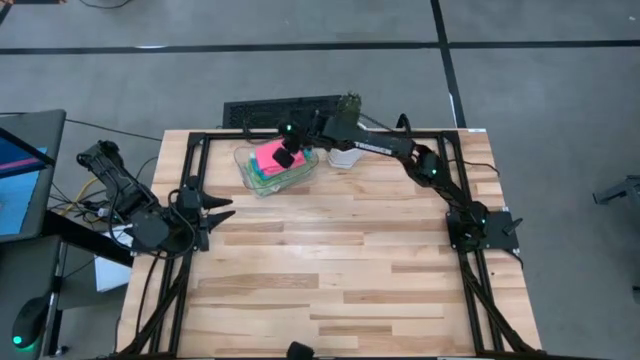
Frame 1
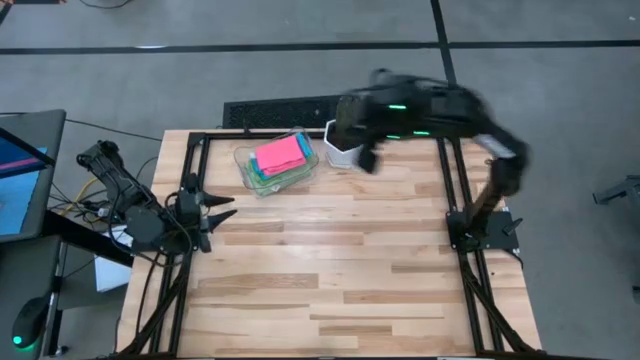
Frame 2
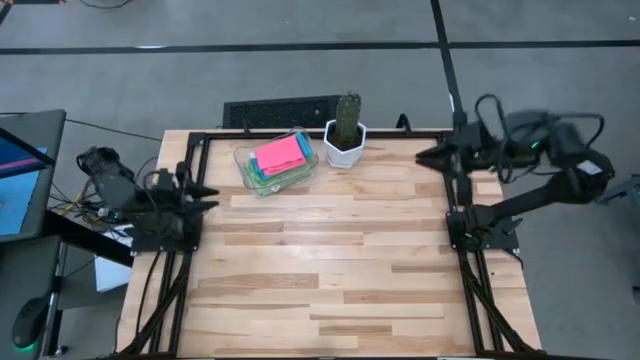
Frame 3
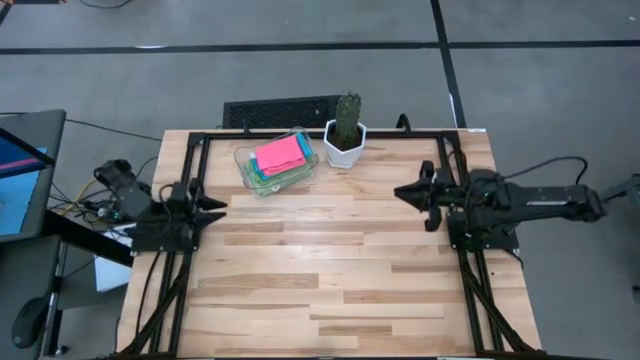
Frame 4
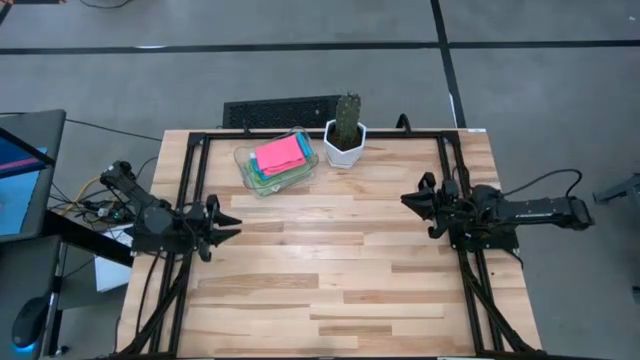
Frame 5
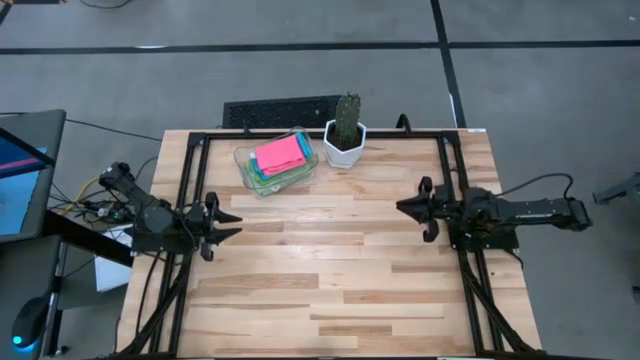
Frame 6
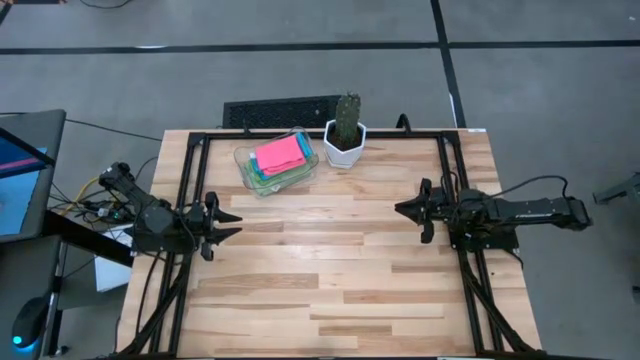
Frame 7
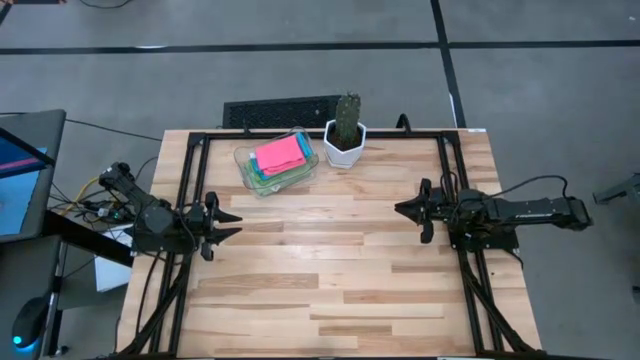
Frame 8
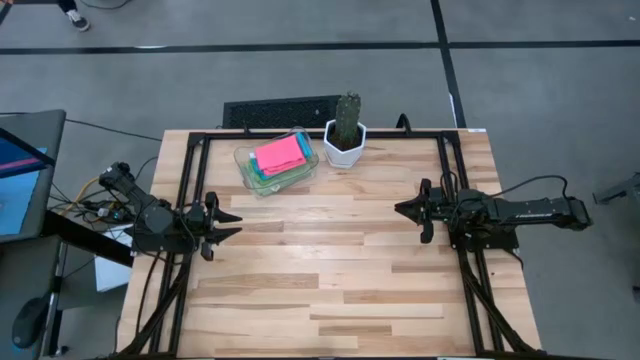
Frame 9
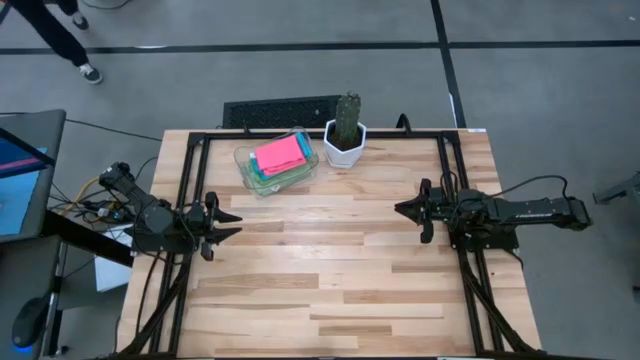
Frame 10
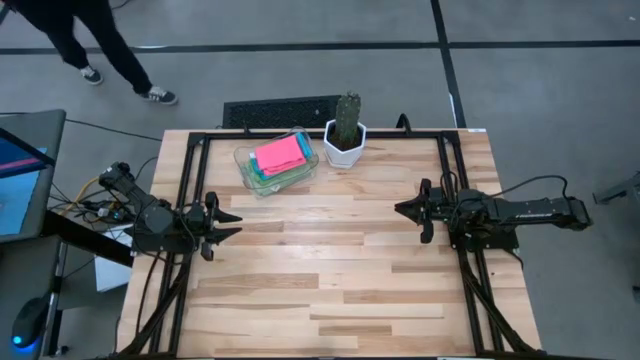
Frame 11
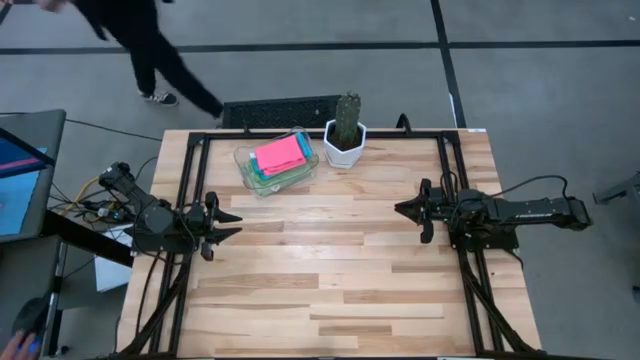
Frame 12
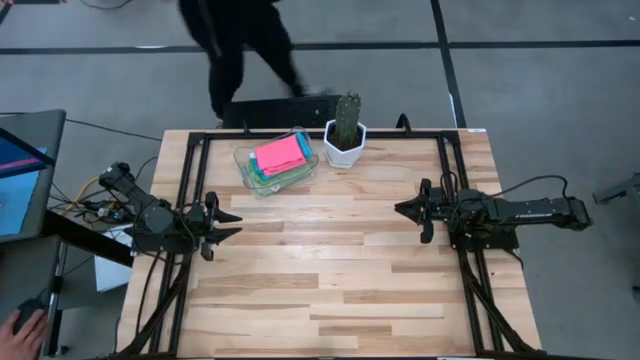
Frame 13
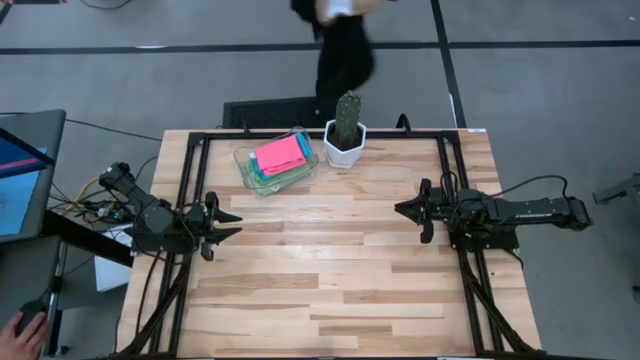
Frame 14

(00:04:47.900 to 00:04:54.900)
Task: Fold microfiber towels
Return to Home Position

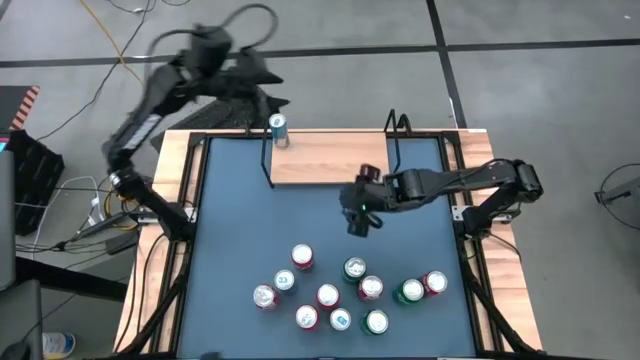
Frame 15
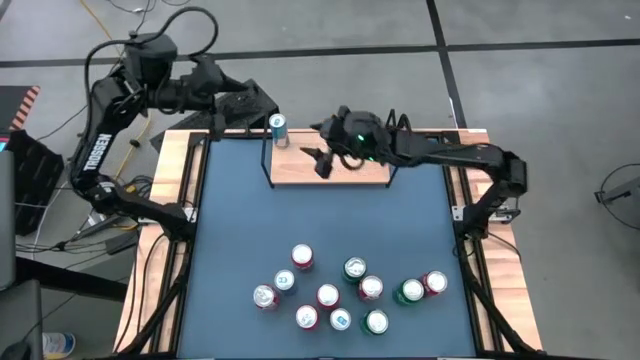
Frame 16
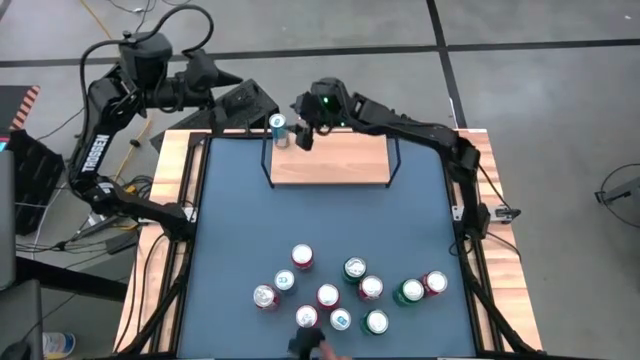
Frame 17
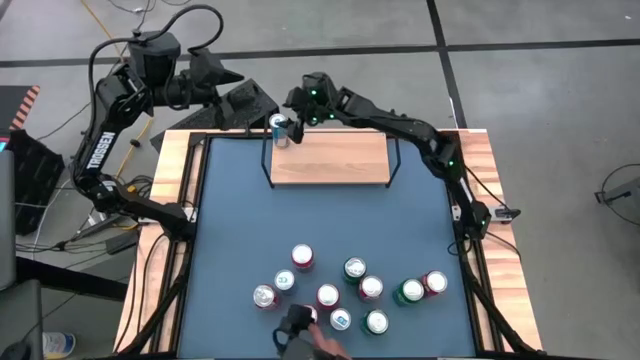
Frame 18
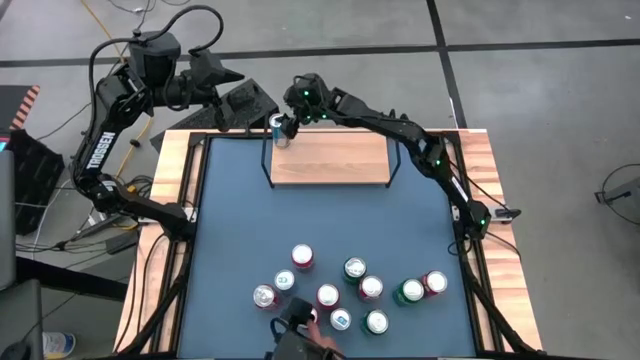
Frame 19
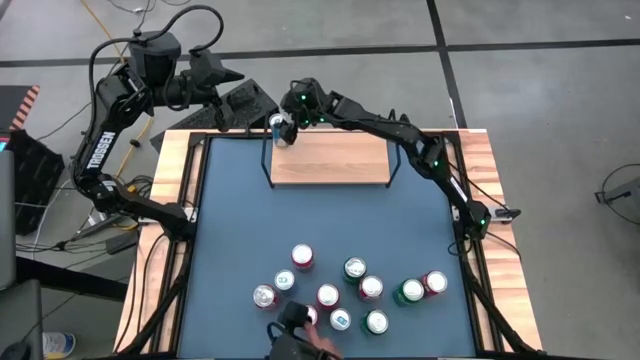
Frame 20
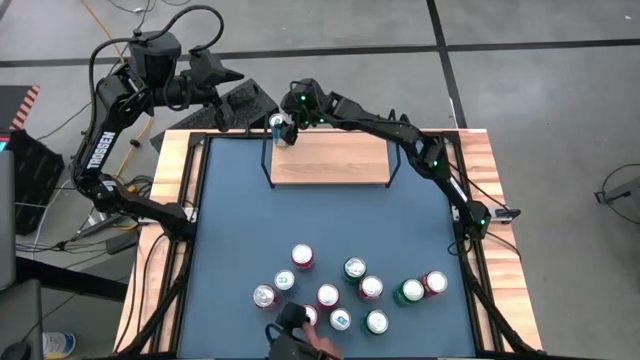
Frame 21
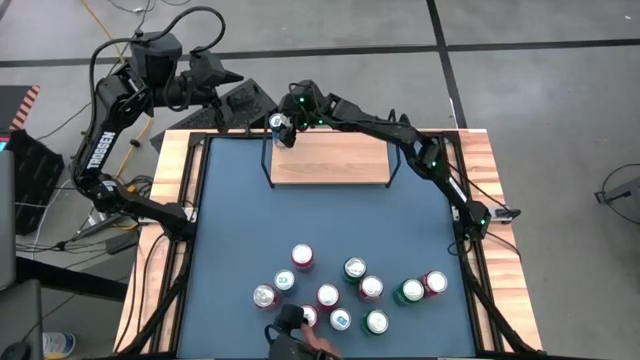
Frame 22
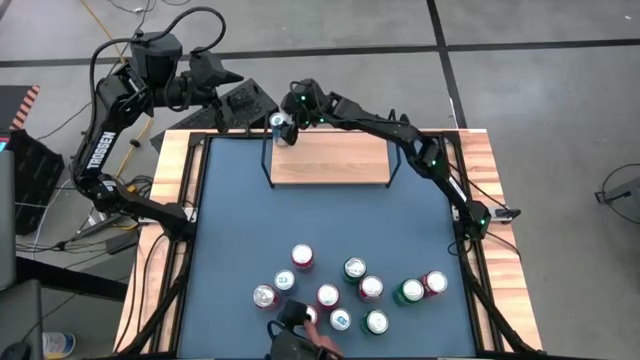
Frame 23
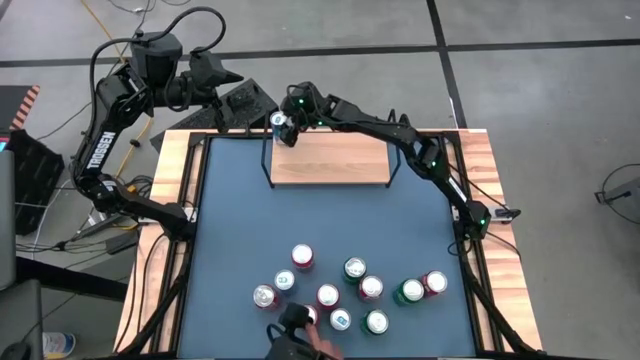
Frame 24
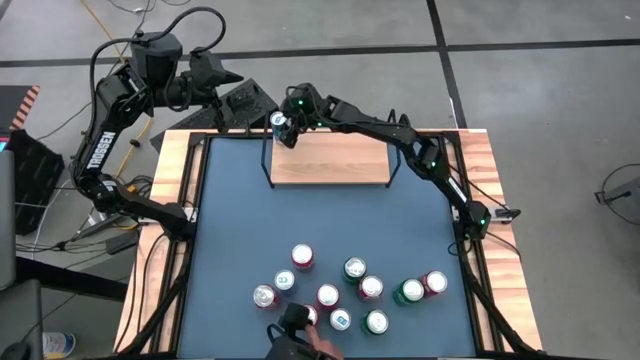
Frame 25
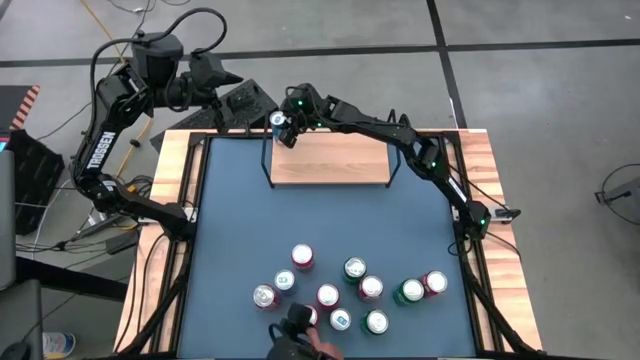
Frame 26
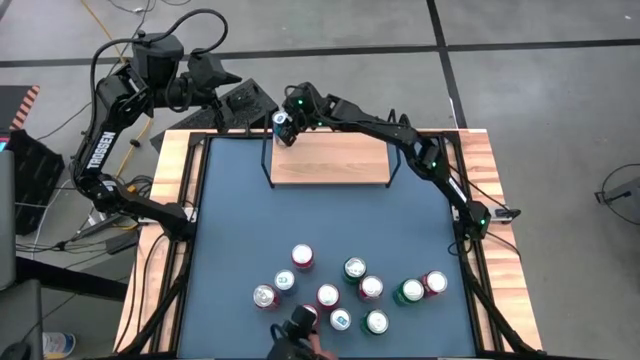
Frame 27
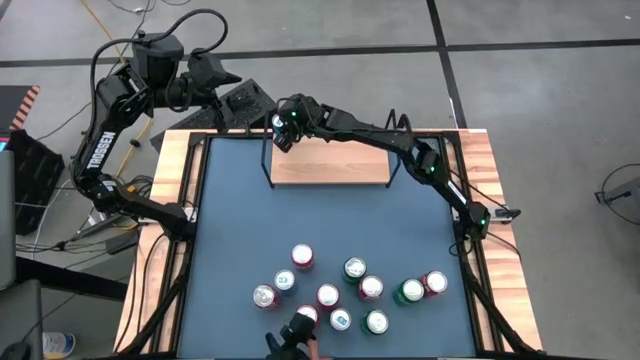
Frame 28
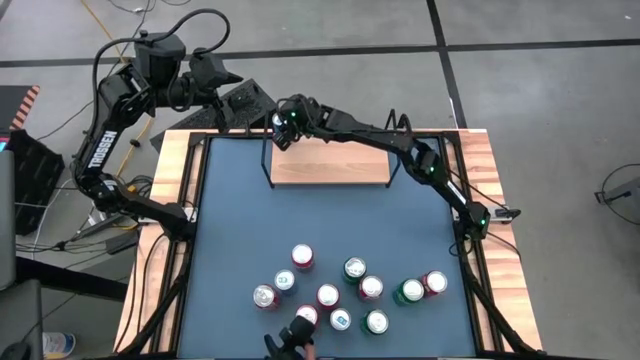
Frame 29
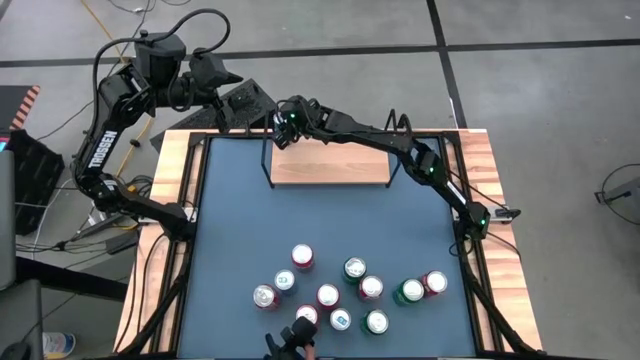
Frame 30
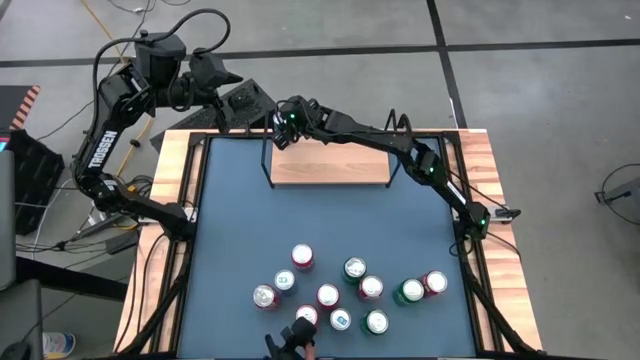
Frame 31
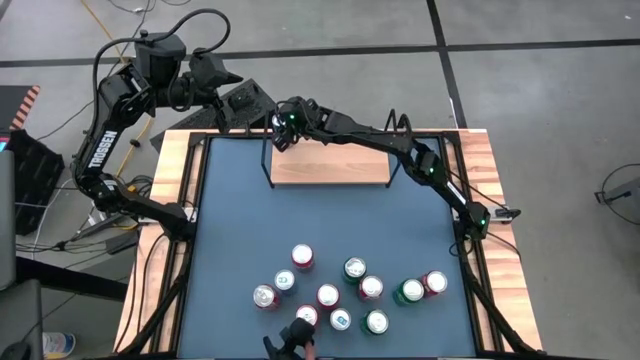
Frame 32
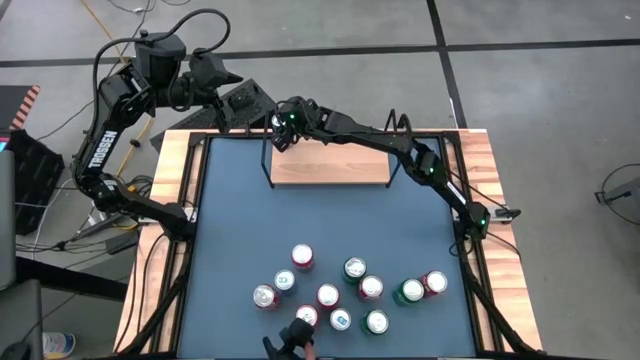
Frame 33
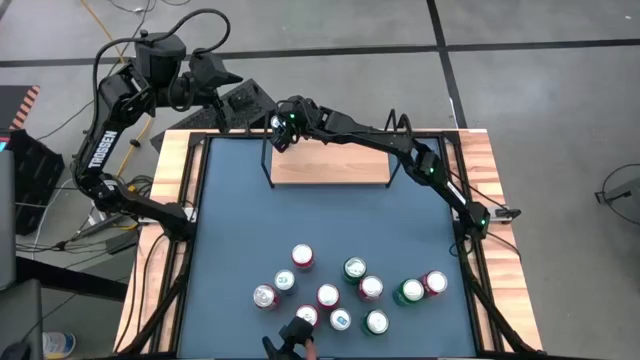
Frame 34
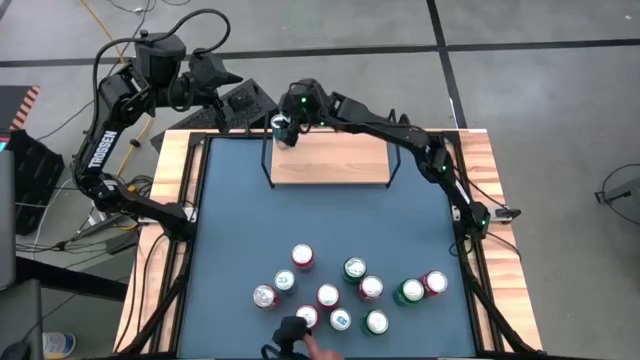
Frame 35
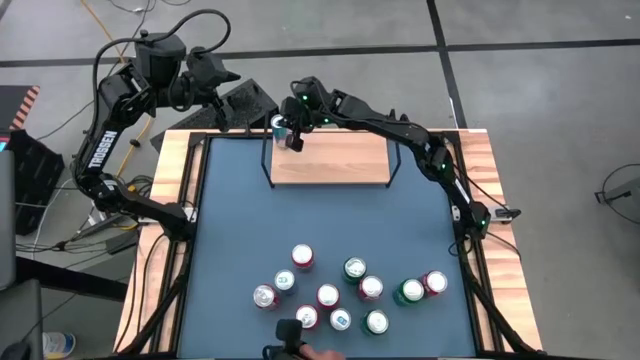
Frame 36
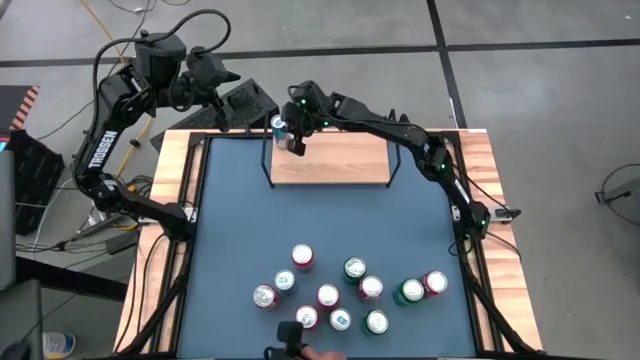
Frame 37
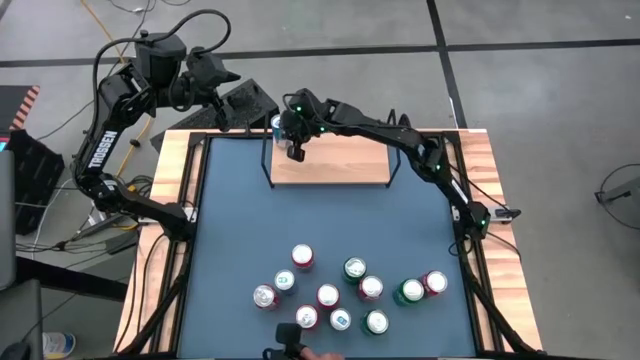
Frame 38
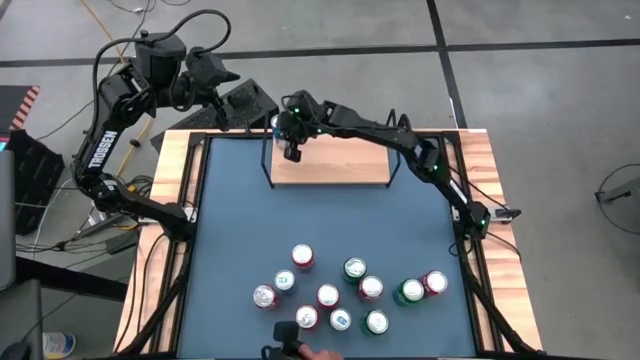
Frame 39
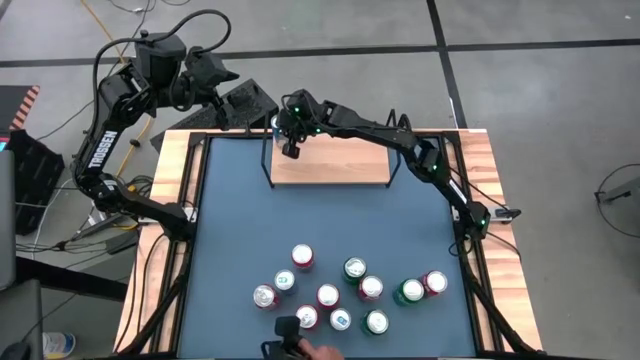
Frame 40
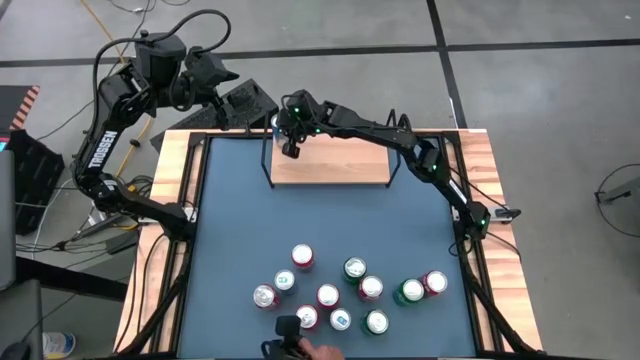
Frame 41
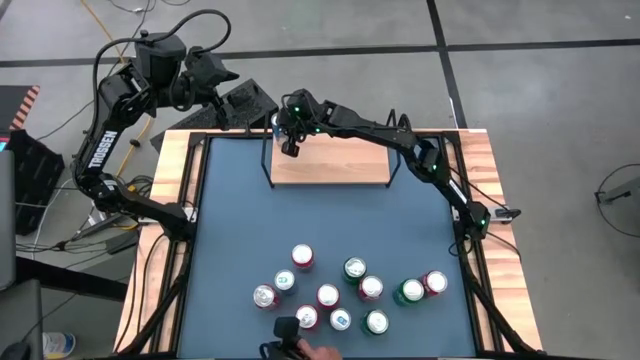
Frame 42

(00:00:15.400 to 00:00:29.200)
Task: Place canned beverage on shelf
Put the top blue soda can on the shelf
